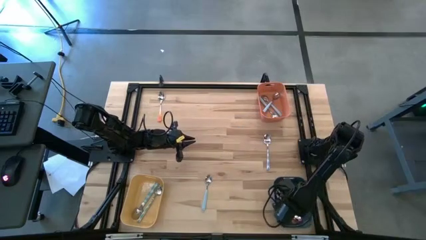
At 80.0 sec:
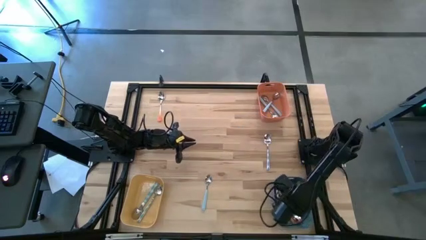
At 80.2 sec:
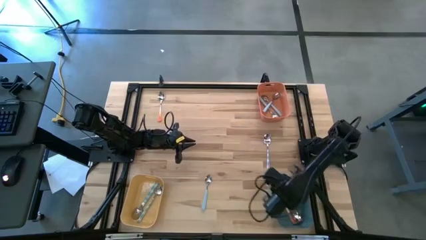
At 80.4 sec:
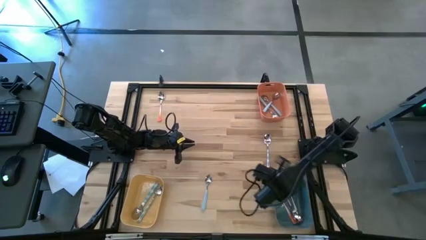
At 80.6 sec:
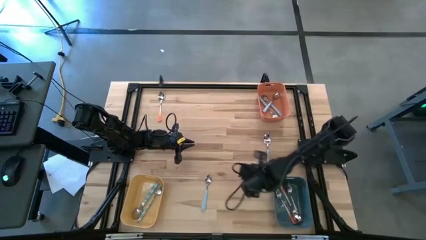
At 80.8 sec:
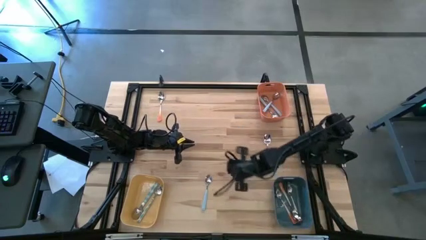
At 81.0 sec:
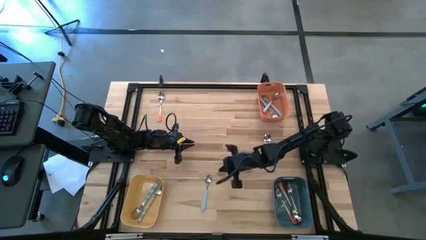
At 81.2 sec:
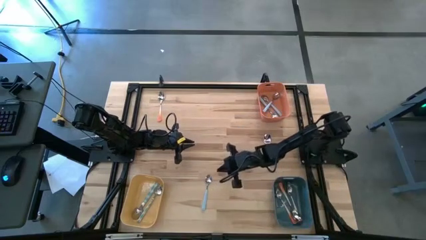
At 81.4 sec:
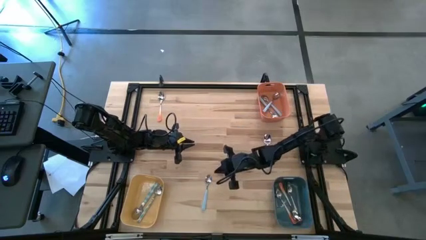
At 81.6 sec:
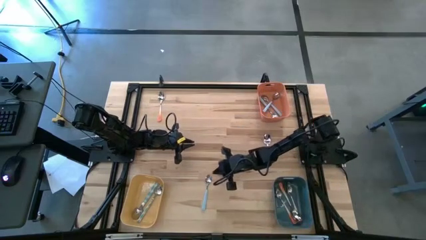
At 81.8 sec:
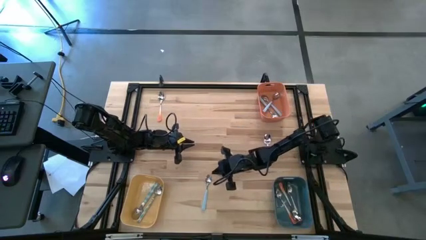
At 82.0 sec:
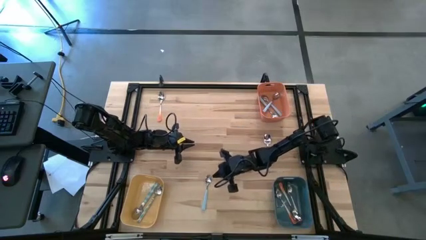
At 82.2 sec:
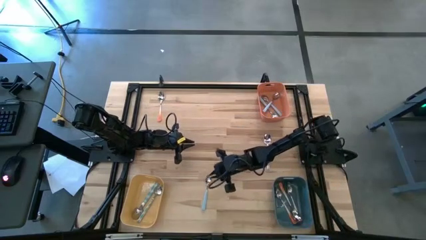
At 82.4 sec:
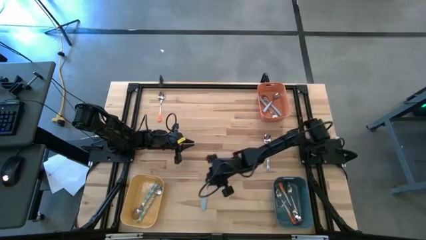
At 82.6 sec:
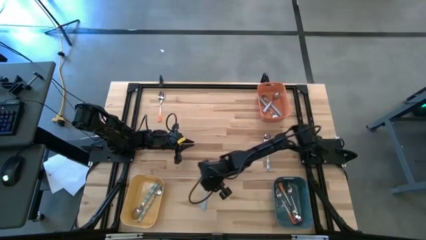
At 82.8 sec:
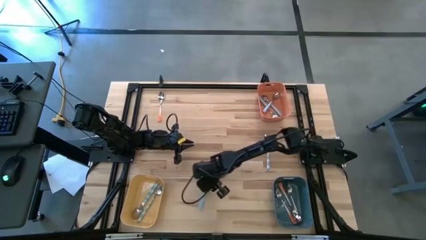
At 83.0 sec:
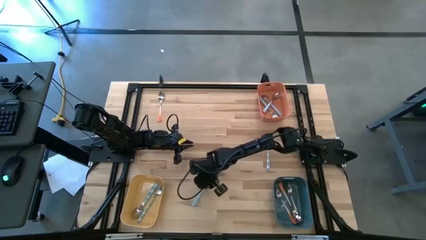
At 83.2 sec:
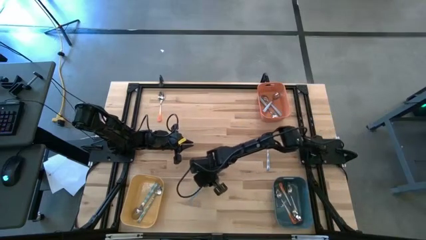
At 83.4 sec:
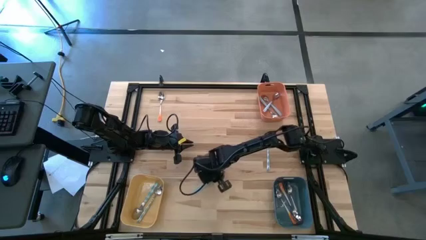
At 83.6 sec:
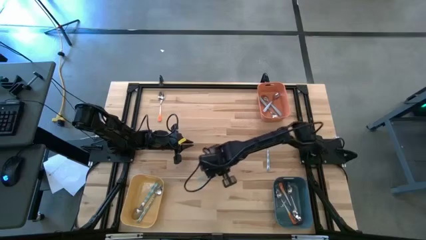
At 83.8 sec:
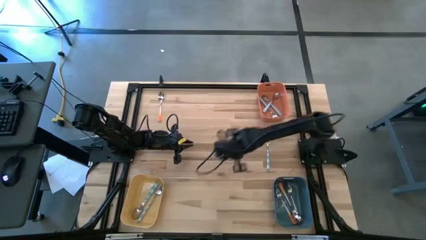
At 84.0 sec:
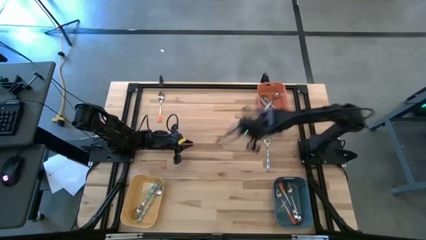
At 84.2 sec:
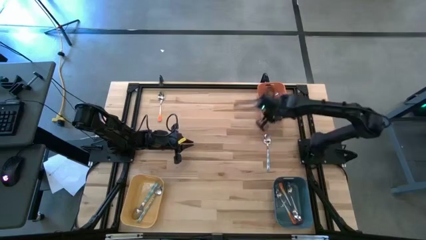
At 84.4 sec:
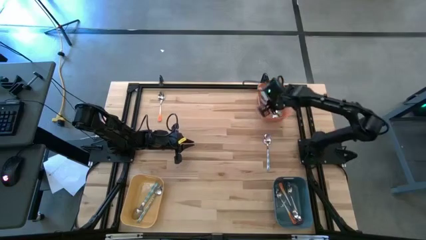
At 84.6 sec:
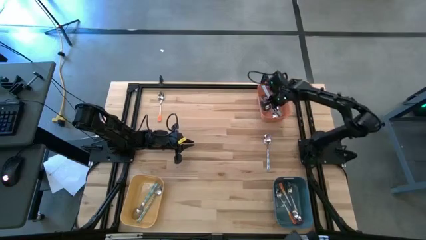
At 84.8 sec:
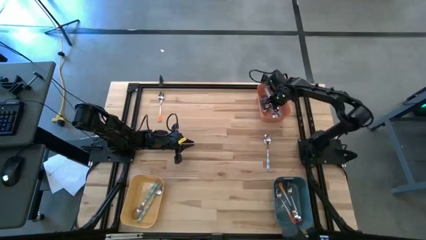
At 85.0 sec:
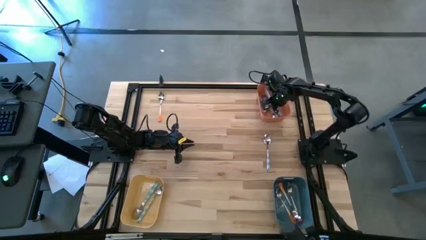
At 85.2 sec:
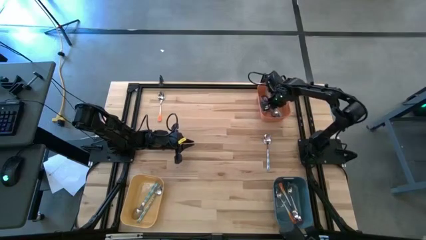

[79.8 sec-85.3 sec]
Task: Sort silverware by color (type)
Put the blue spoon into the orange bin

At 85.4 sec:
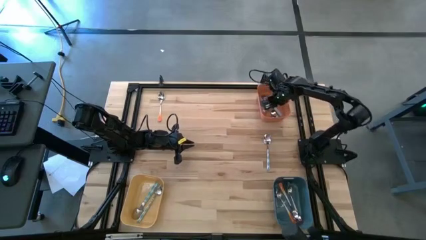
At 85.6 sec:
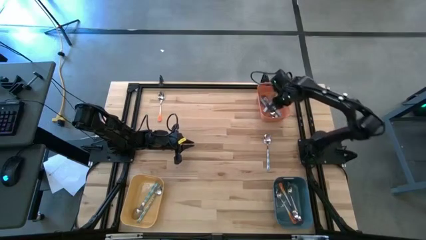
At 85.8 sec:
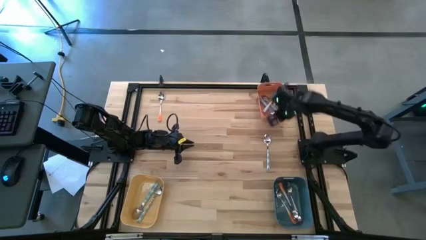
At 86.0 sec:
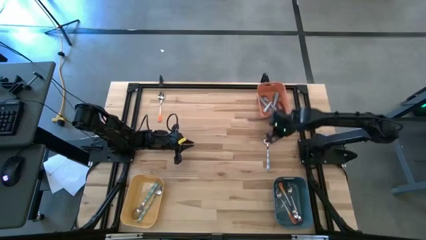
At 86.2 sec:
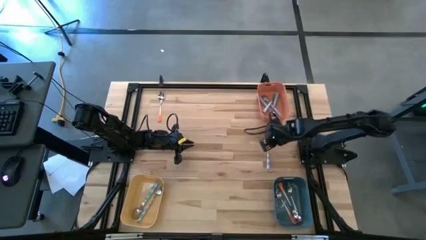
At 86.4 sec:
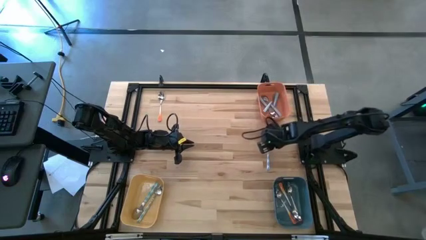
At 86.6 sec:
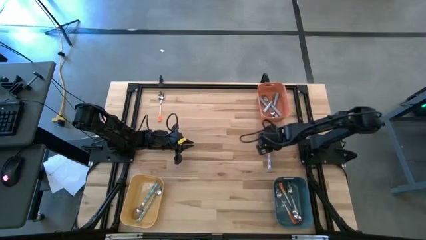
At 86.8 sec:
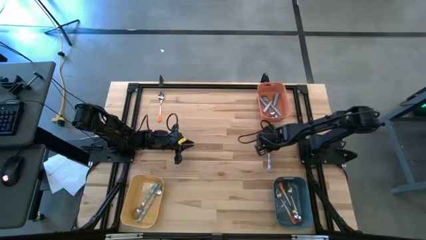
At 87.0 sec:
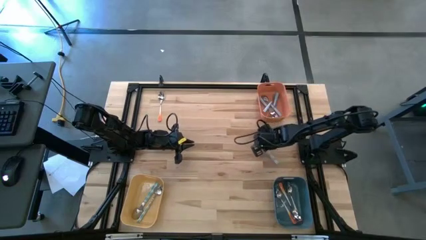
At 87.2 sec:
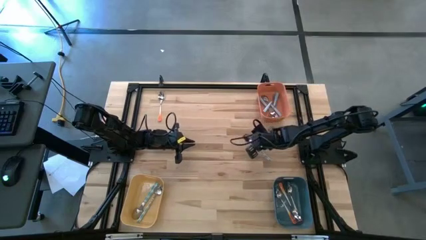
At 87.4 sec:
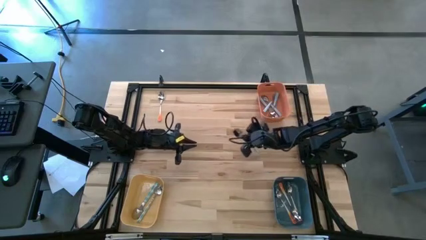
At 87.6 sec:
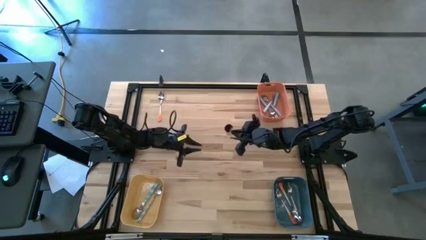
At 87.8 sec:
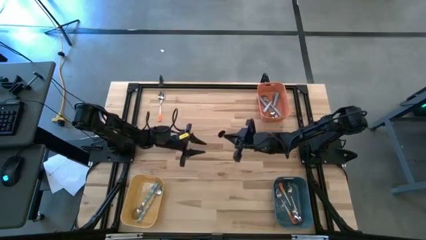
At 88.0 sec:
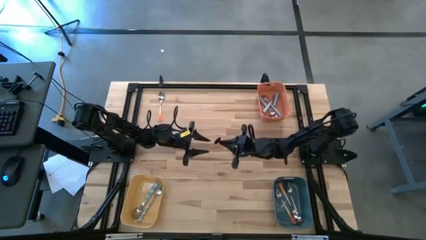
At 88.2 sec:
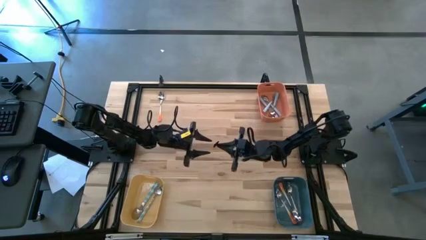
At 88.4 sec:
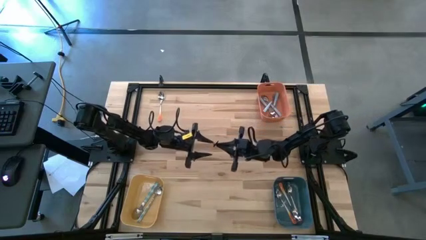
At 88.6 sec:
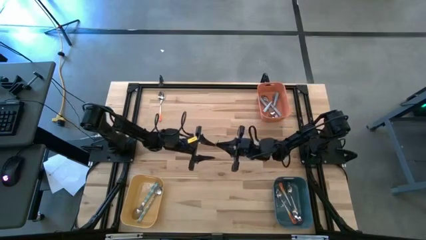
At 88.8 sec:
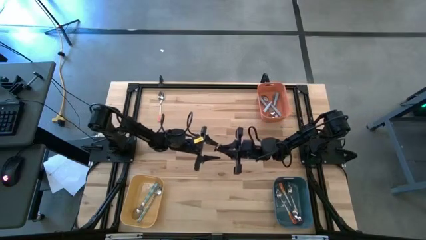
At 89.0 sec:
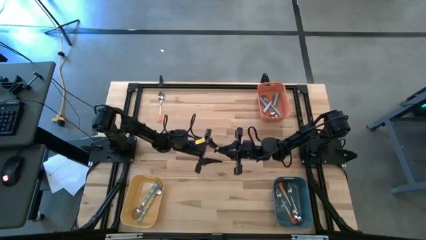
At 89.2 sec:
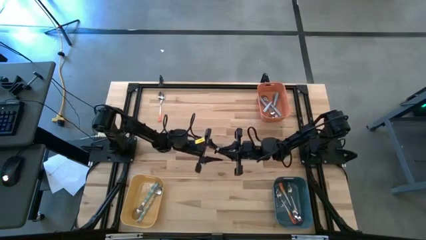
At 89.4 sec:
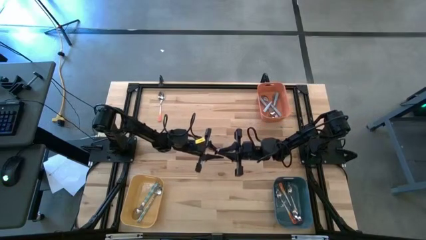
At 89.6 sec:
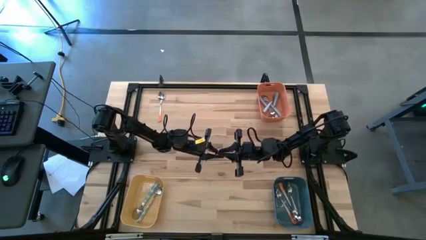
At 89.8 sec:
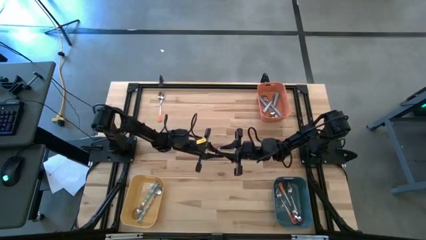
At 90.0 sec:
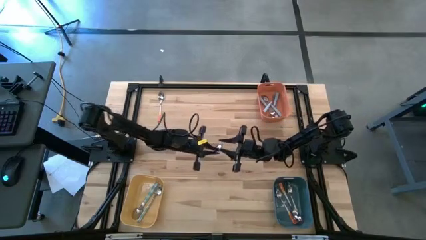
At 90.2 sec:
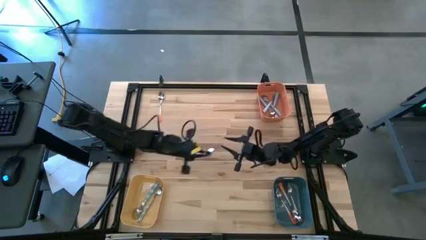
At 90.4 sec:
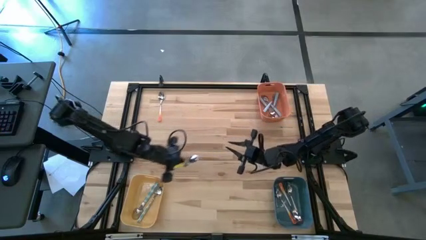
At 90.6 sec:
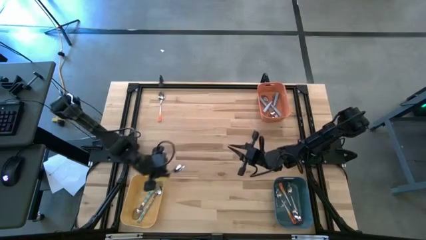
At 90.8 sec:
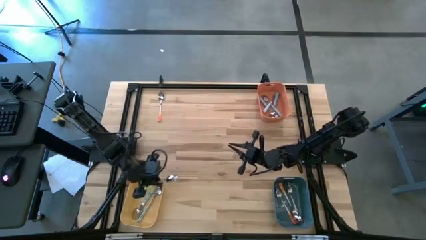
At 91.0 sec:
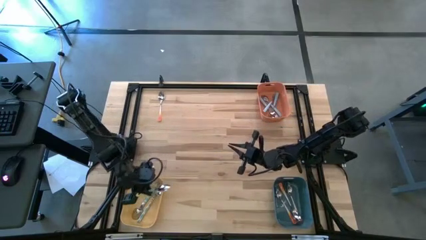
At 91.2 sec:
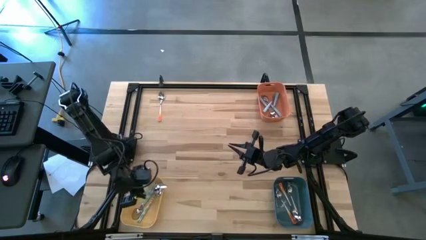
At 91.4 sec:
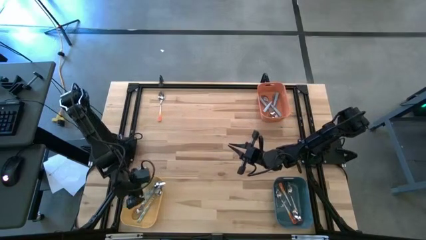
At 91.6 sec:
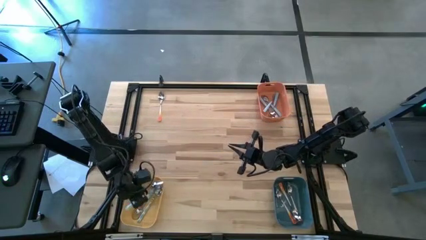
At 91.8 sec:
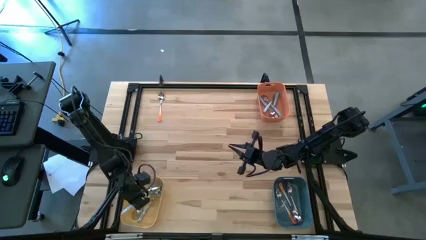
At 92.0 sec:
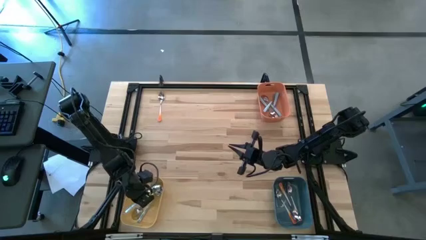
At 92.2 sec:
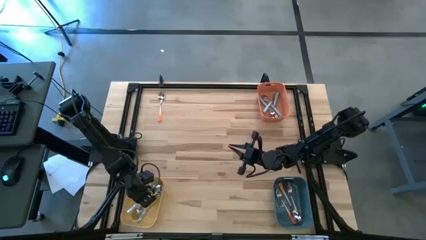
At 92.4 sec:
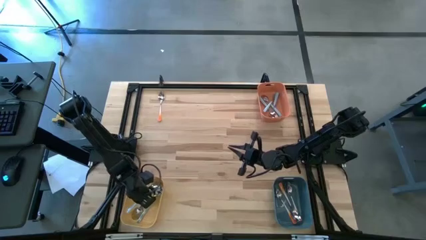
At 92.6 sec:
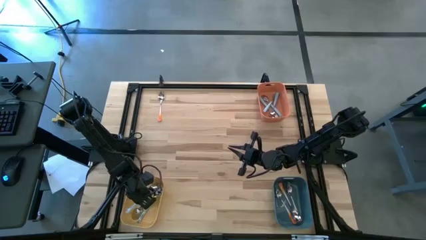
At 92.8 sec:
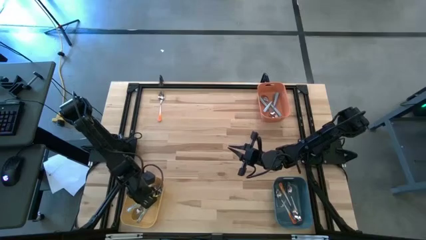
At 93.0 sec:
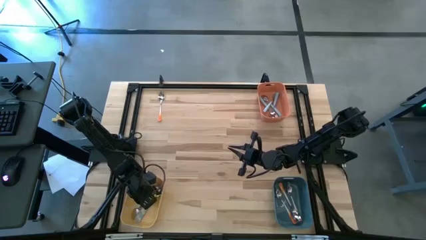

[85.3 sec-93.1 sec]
Put the light blue patterned spoon into the yellow bin
